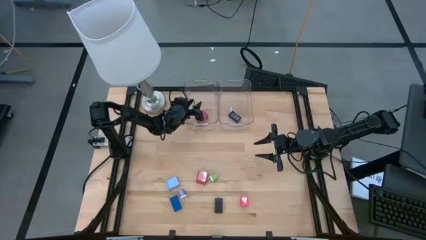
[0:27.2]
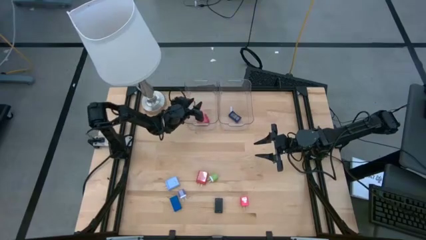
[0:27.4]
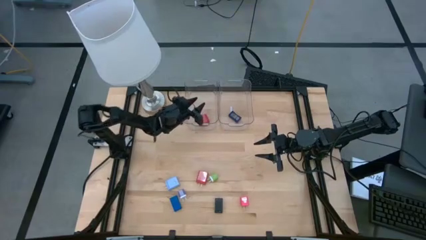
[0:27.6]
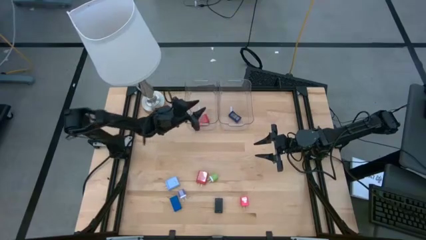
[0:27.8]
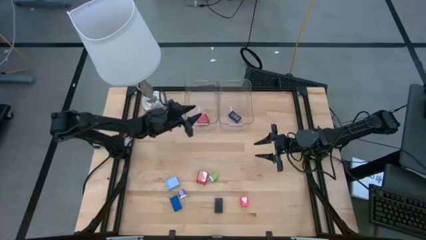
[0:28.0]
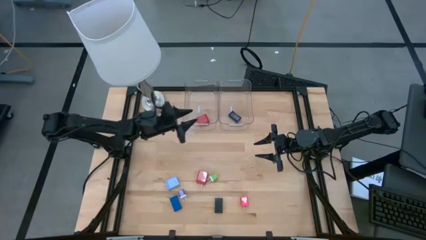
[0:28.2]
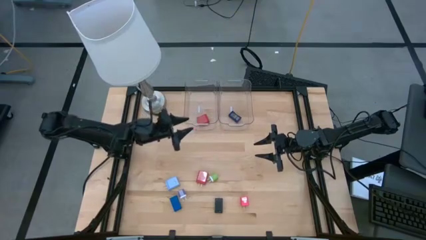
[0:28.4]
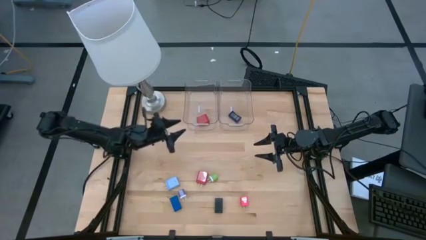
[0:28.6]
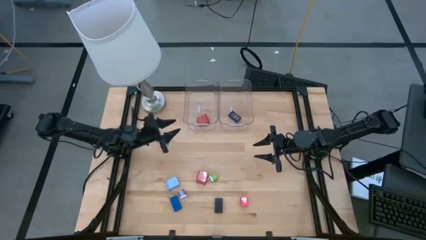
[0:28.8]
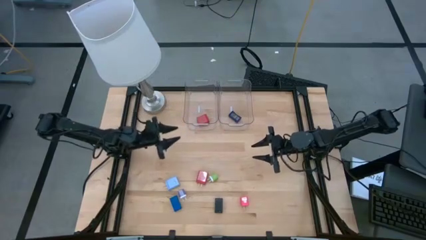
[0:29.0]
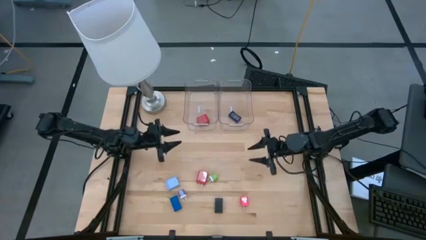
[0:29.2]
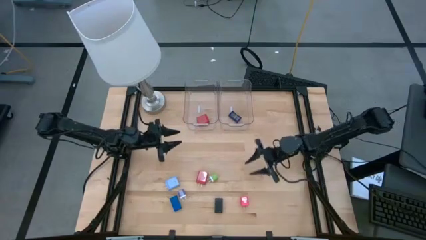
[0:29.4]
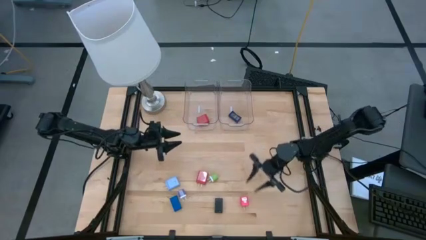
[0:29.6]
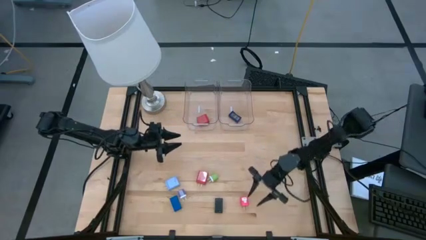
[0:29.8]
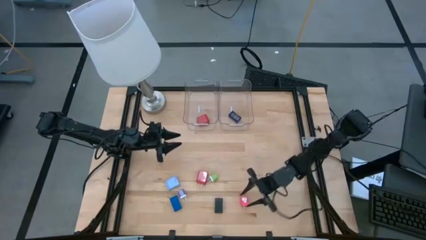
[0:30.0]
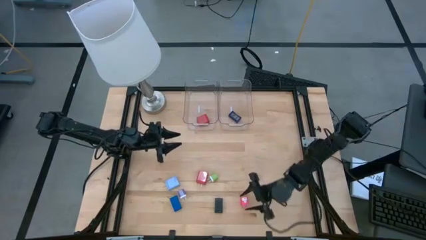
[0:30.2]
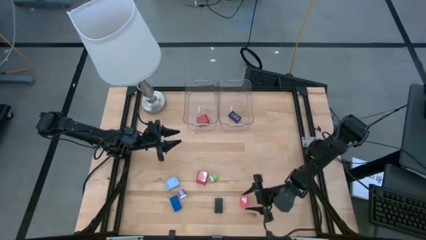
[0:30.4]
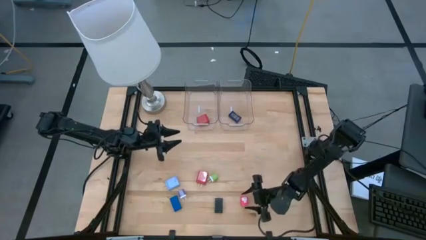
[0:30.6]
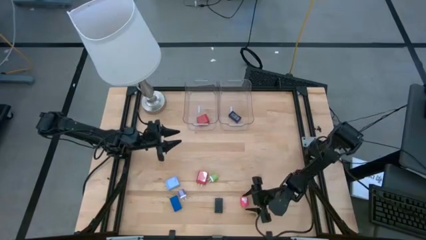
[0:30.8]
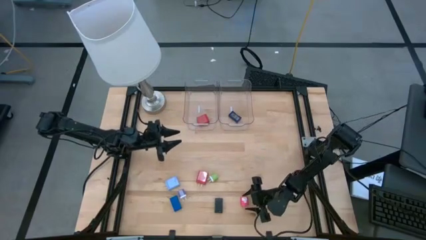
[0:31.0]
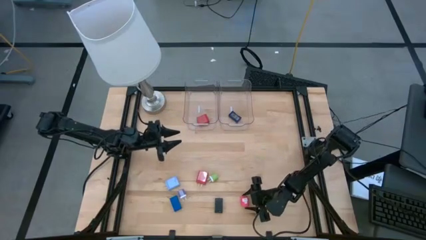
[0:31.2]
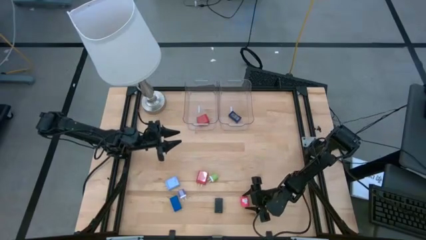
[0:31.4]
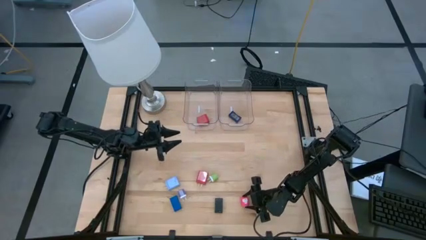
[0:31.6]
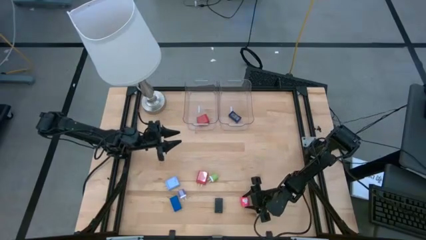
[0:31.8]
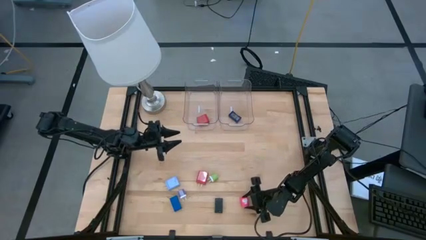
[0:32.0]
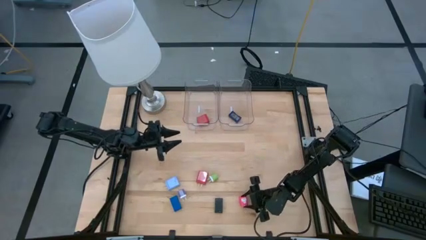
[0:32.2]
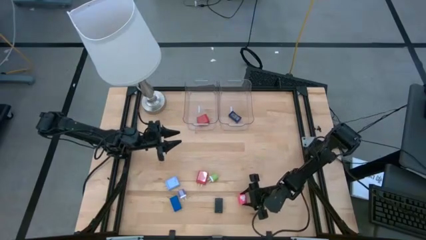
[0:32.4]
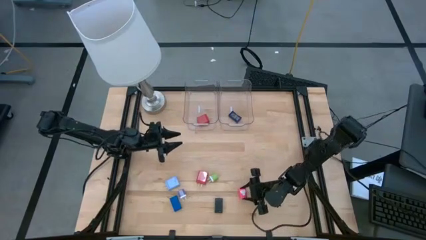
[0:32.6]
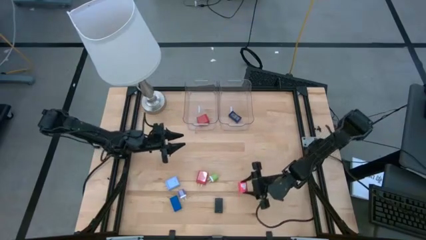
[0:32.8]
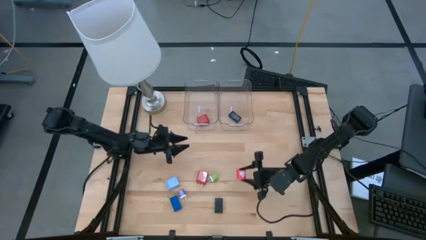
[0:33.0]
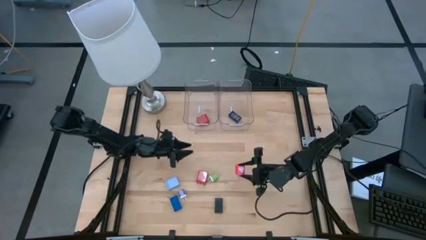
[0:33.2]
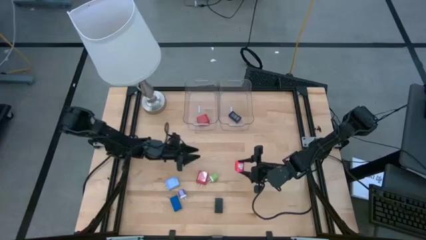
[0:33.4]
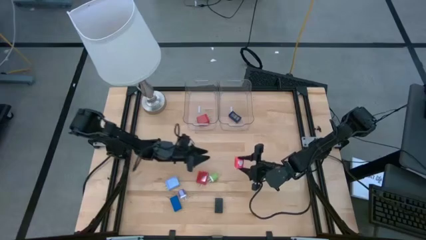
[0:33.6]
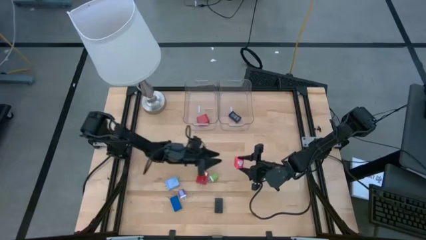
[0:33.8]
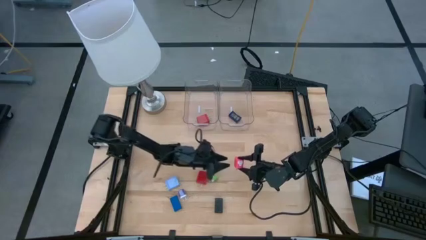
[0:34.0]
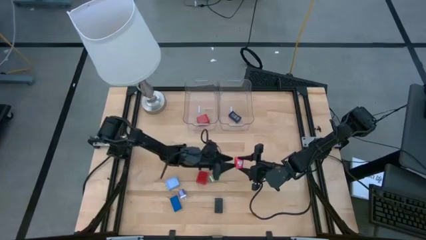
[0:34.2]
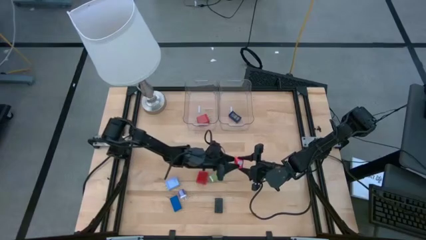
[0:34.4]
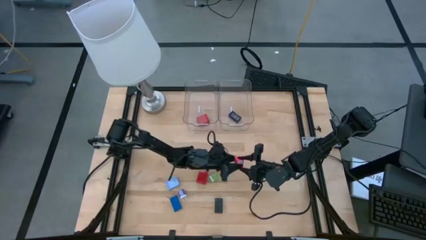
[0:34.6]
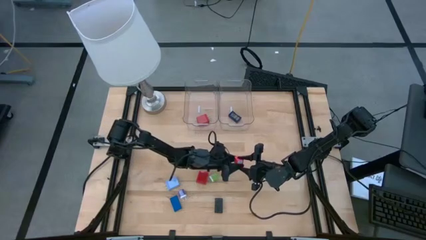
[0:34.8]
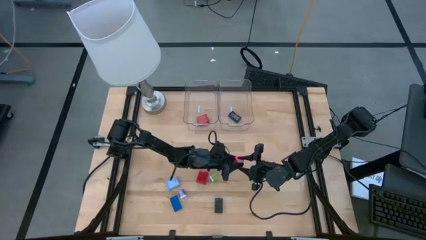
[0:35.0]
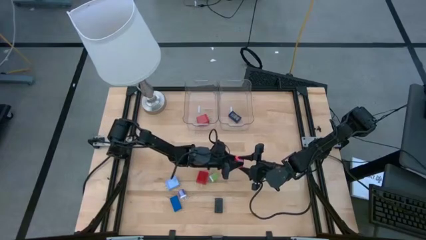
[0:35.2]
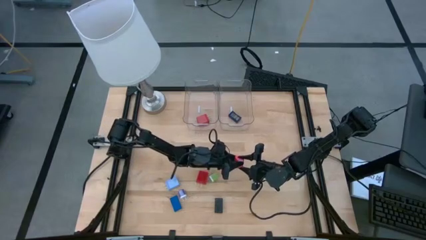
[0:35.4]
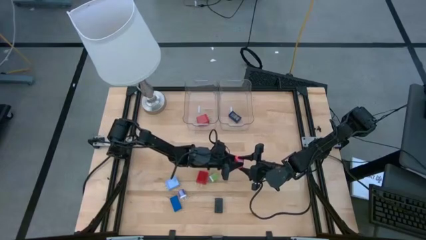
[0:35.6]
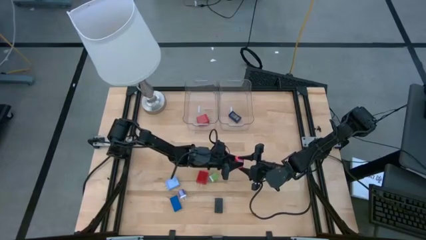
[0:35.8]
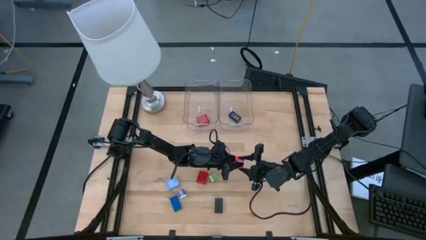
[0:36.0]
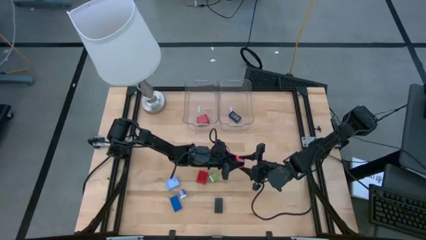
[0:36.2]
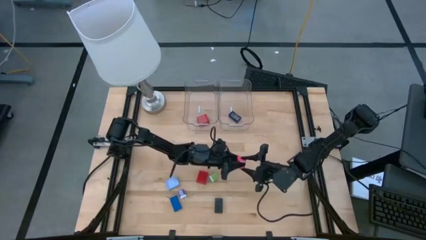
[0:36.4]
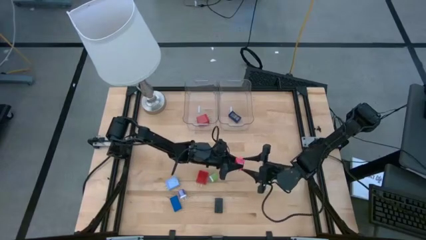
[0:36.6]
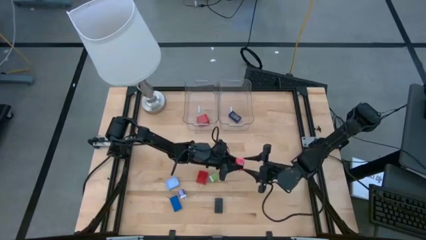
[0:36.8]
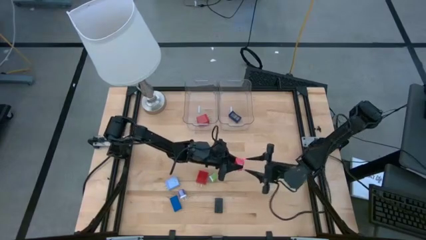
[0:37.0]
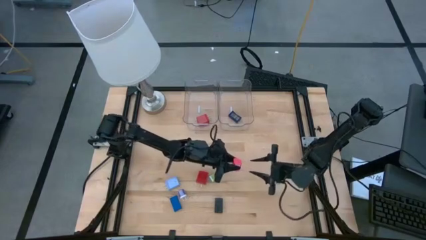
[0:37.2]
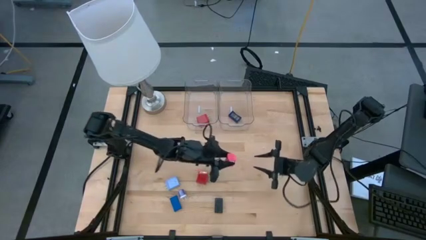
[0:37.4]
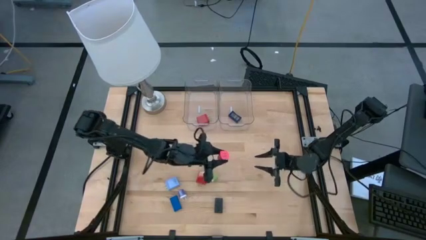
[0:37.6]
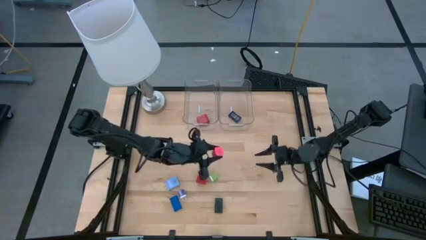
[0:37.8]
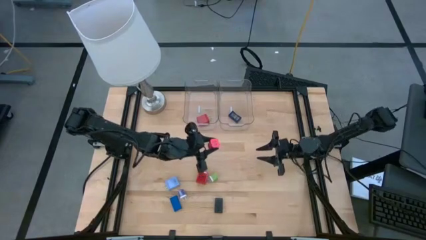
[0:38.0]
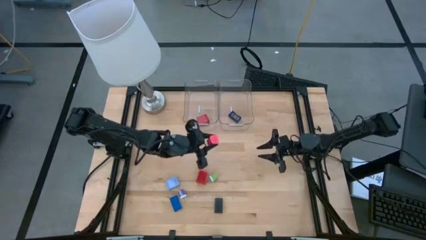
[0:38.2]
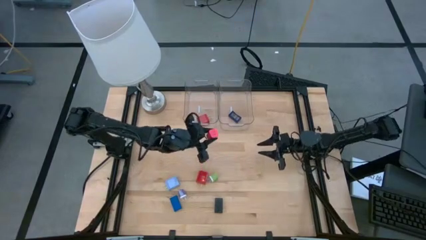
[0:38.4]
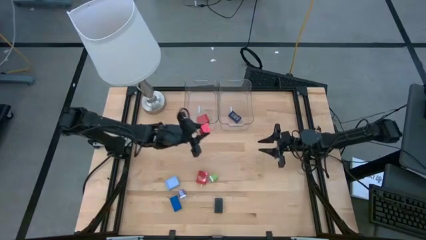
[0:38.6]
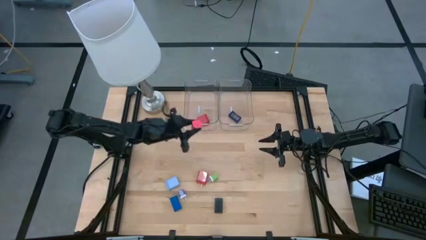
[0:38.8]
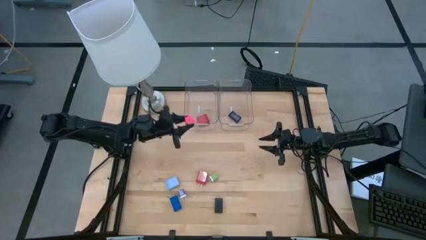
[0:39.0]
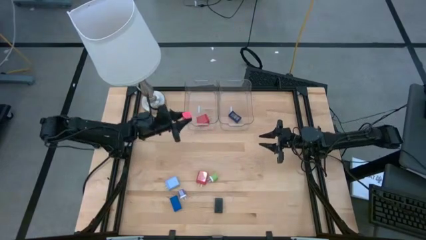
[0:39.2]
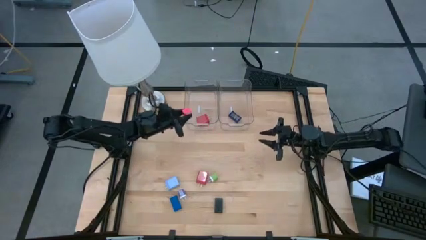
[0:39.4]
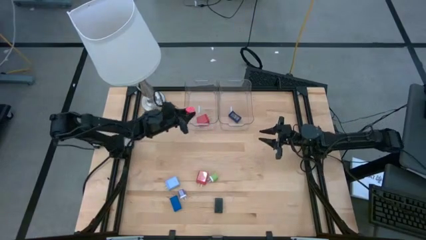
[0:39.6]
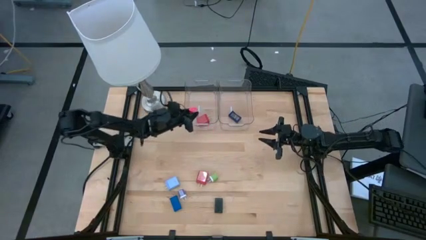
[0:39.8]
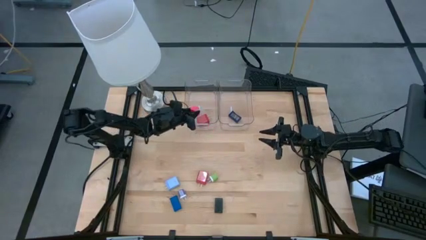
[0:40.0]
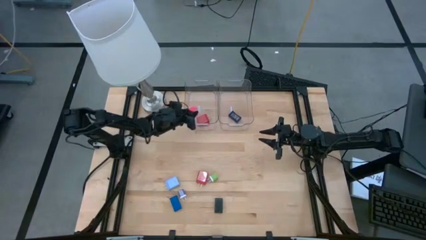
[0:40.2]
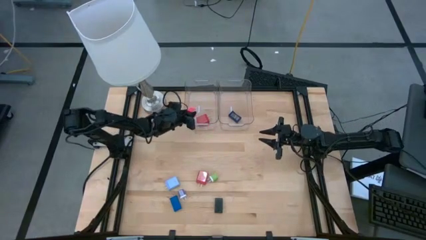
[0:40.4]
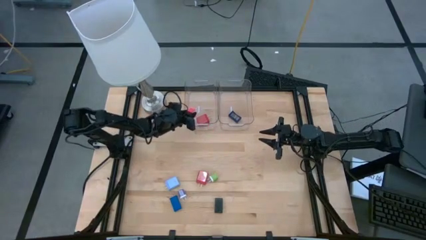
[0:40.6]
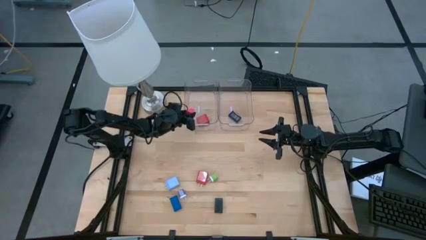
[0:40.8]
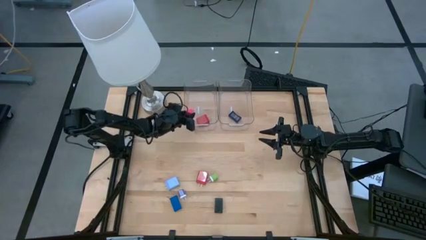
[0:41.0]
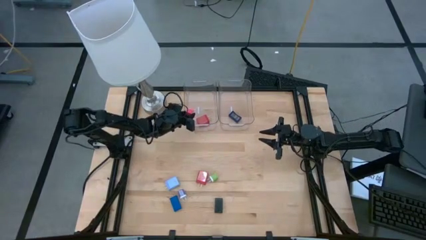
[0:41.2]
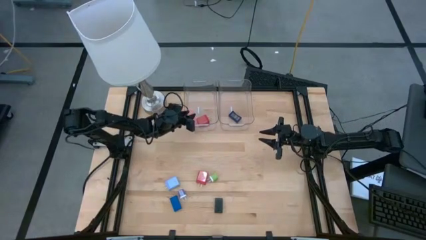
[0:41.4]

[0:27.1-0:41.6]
Task: Pick & Place Office items
Put the pink charger adapter into the left transparent bin
